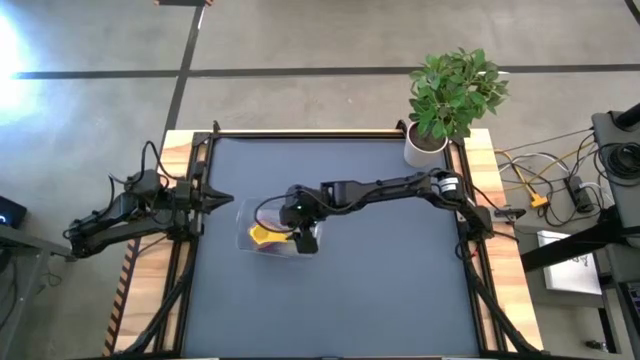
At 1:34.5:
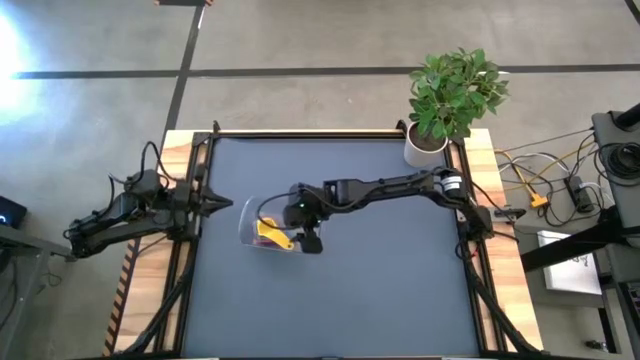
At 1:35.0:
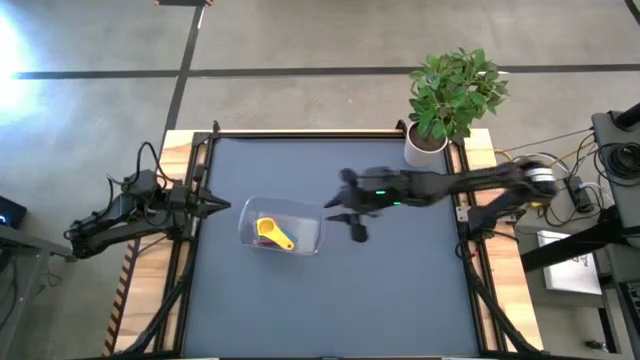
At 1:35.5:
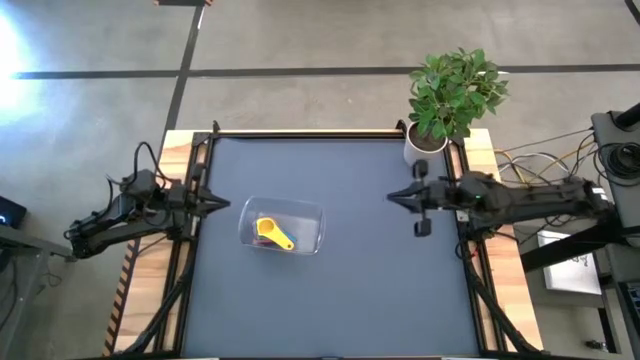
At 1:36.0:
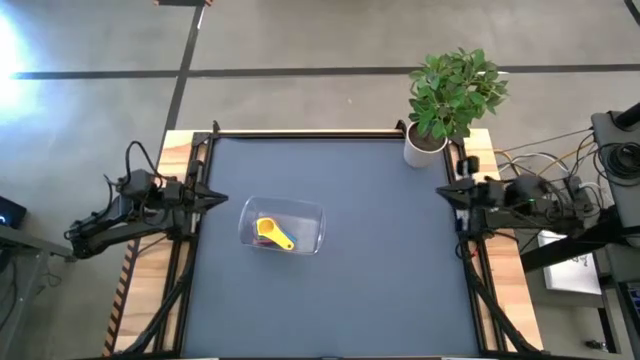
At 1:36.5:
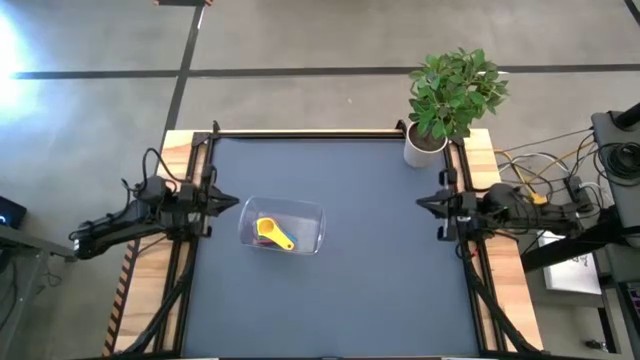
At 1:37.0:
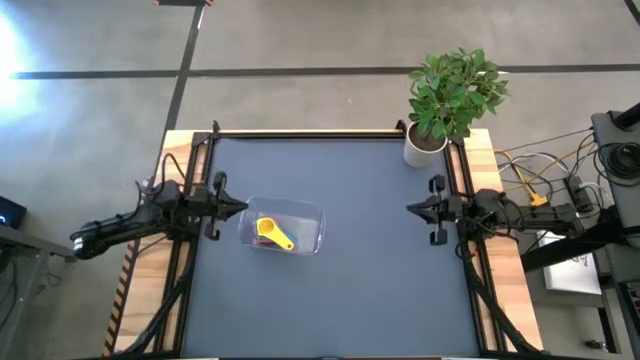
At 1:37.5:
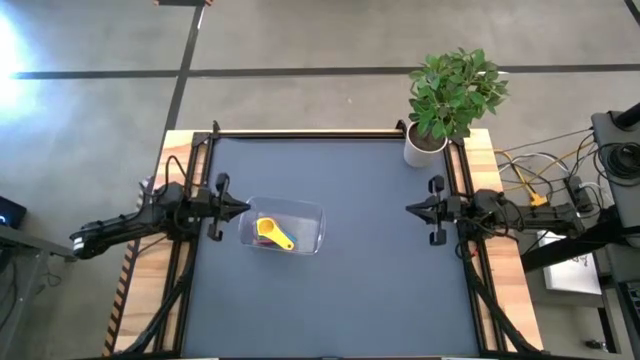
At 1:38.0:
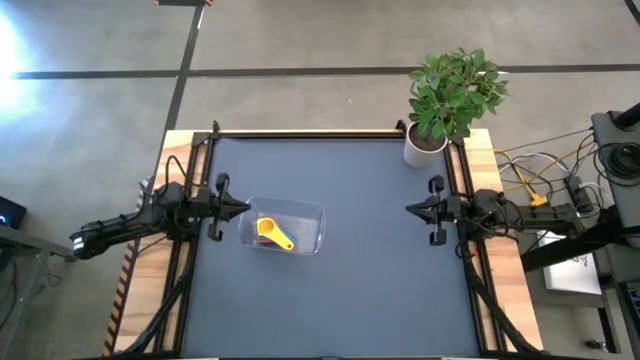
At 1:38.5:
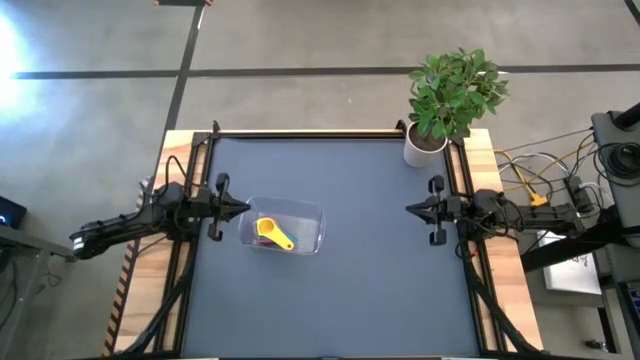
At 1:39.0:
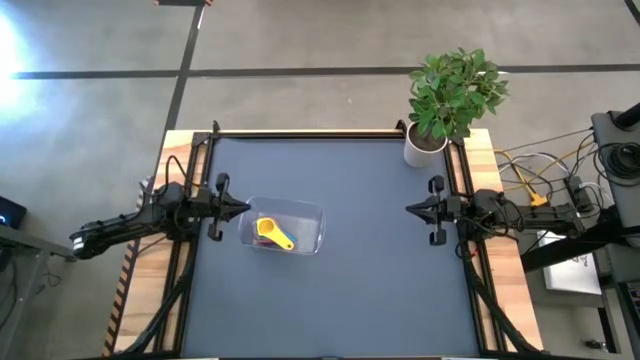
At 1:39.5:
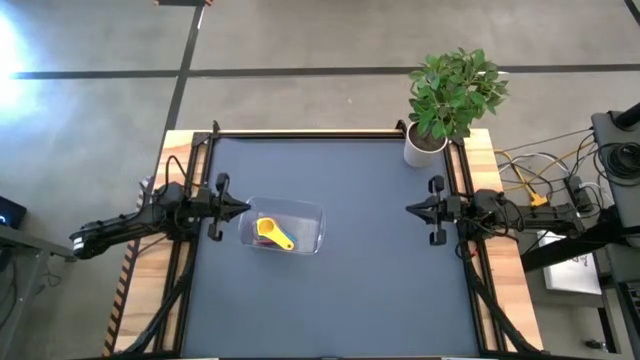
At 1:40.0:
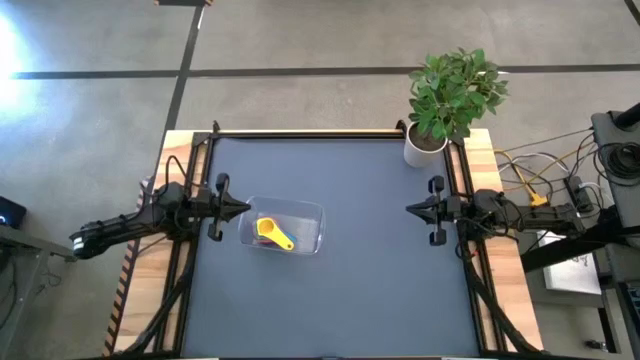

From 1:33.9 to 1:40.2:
Task: Nest measuring cups in basket
Return to Home Position

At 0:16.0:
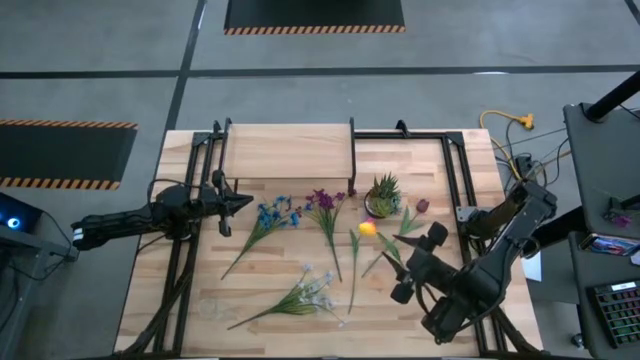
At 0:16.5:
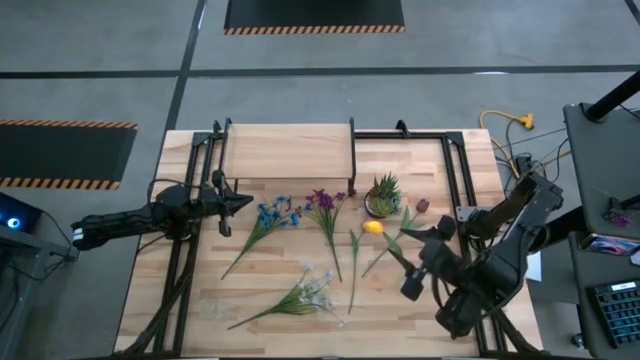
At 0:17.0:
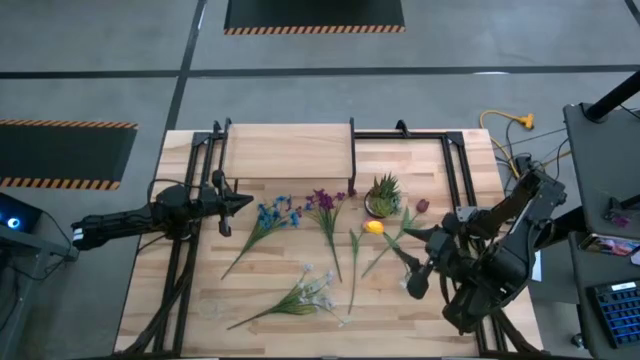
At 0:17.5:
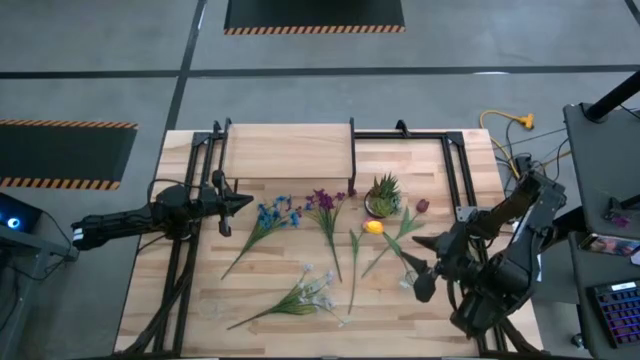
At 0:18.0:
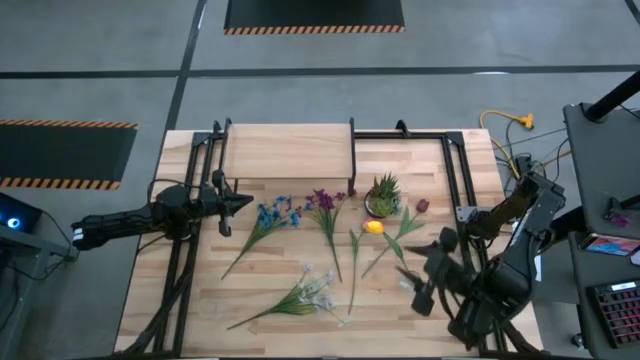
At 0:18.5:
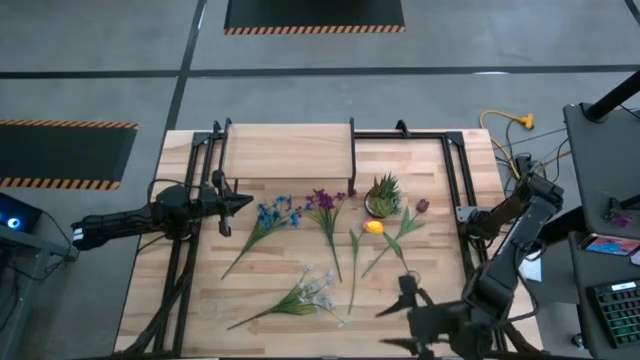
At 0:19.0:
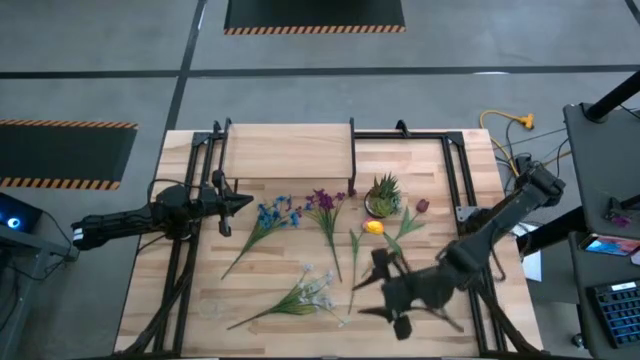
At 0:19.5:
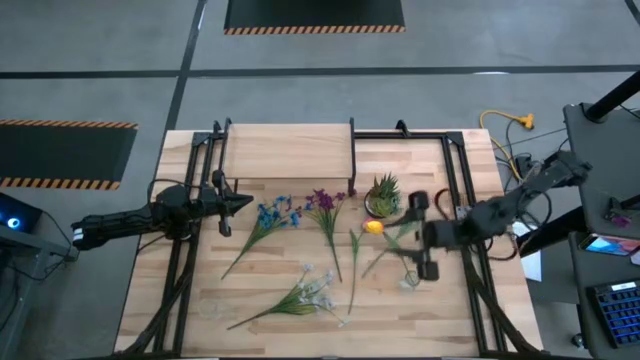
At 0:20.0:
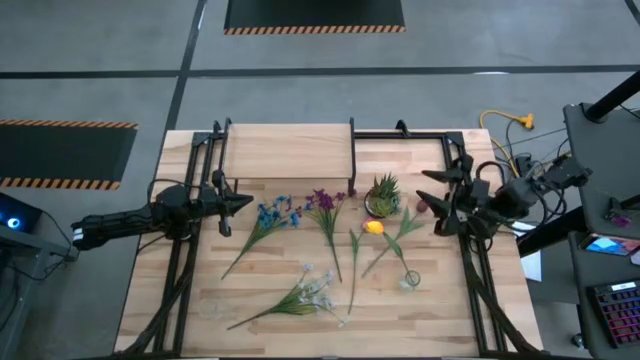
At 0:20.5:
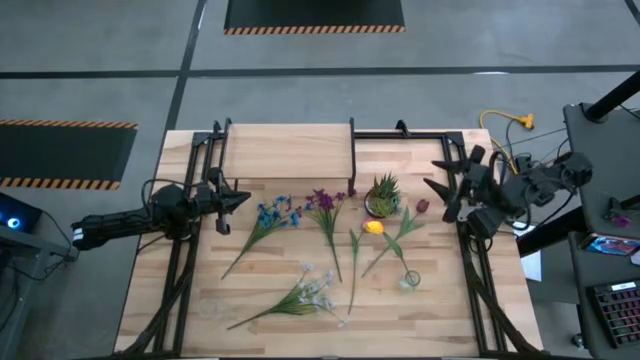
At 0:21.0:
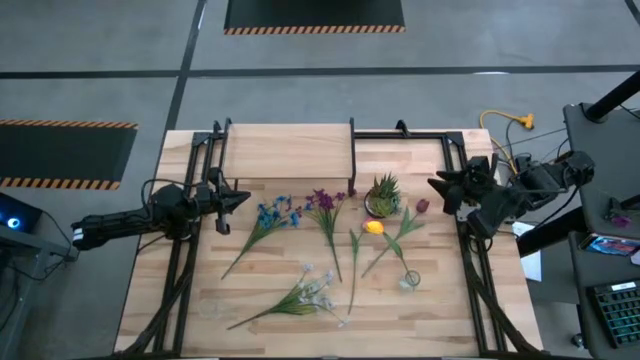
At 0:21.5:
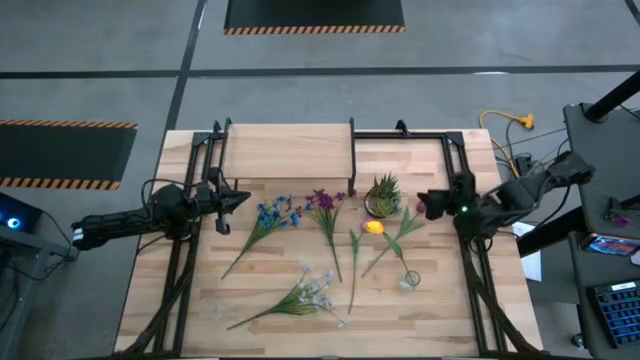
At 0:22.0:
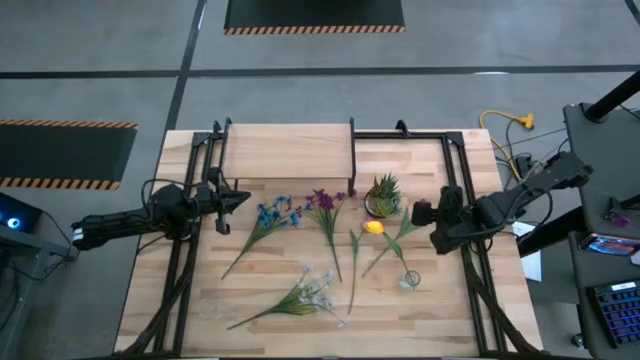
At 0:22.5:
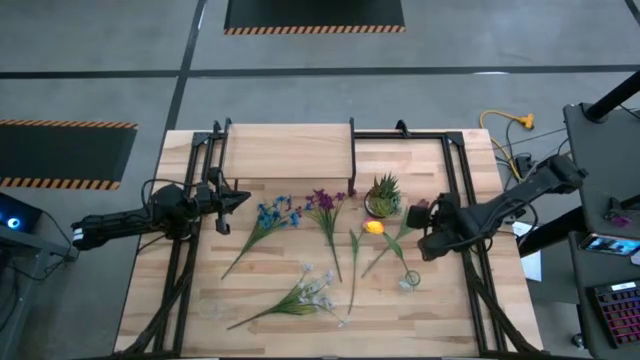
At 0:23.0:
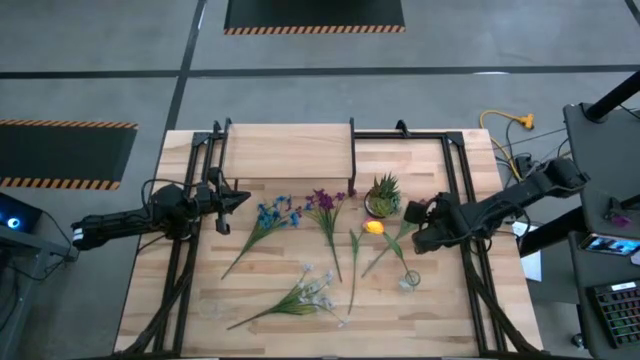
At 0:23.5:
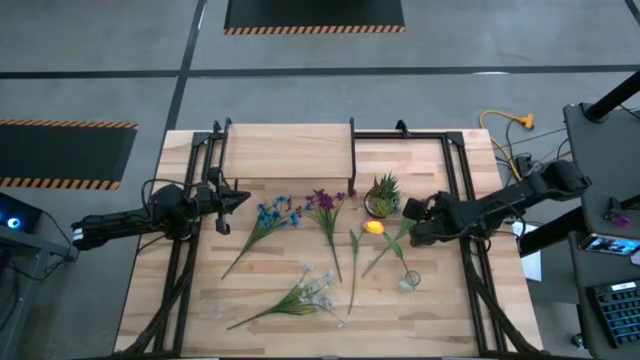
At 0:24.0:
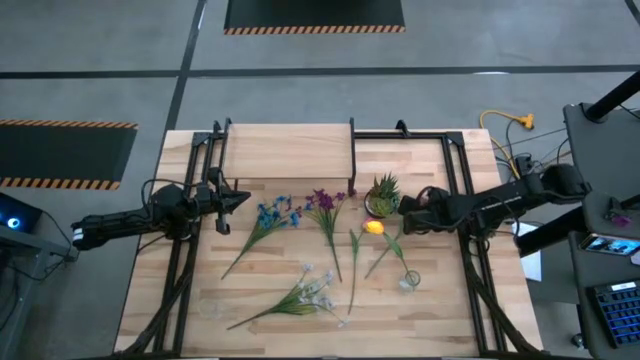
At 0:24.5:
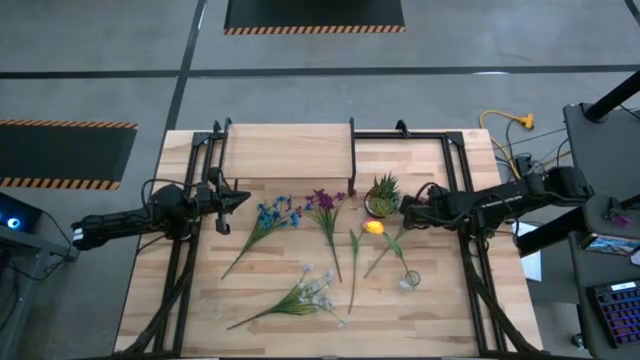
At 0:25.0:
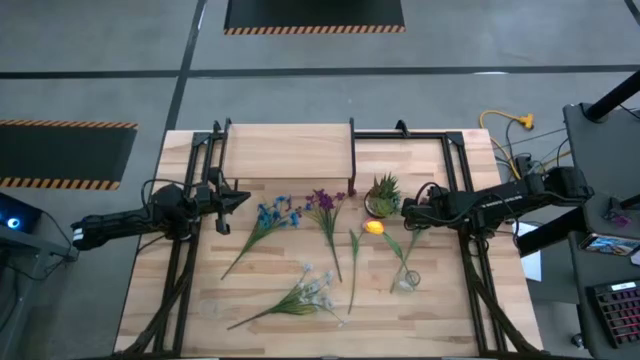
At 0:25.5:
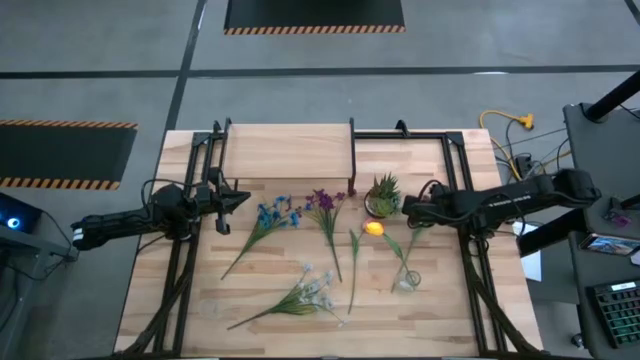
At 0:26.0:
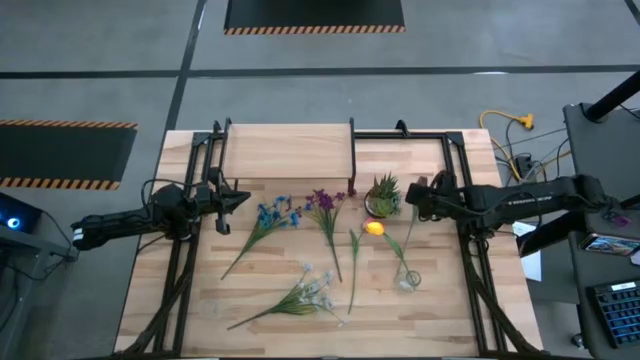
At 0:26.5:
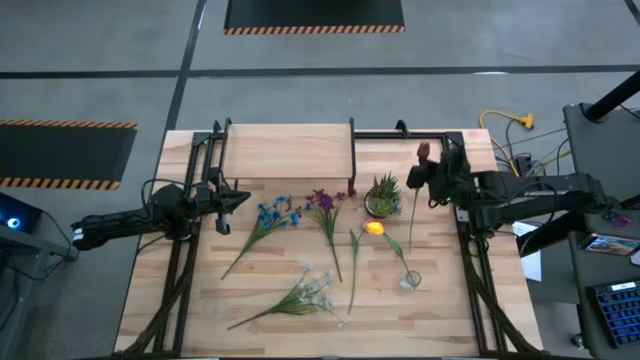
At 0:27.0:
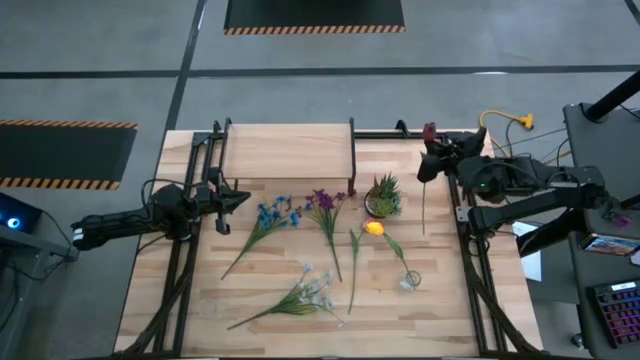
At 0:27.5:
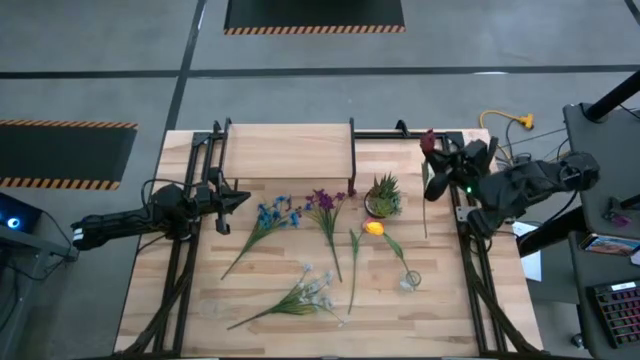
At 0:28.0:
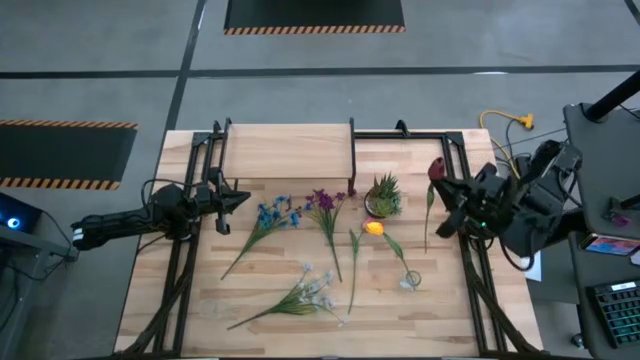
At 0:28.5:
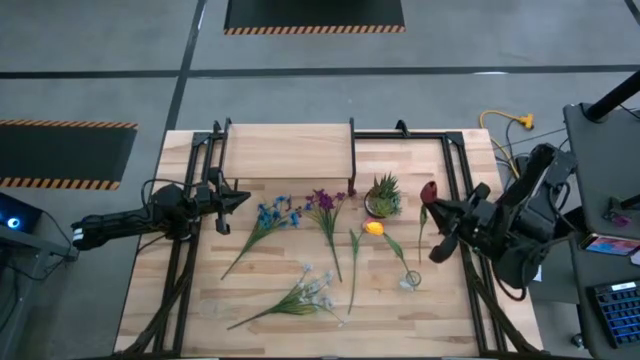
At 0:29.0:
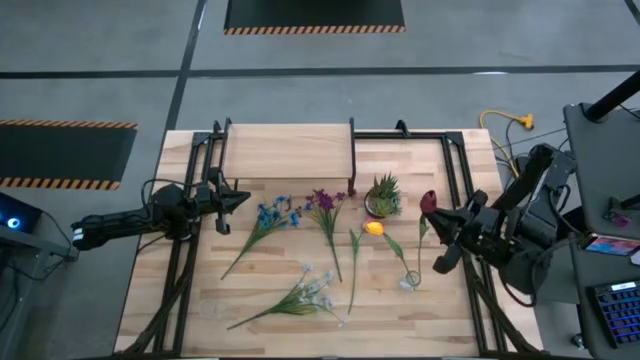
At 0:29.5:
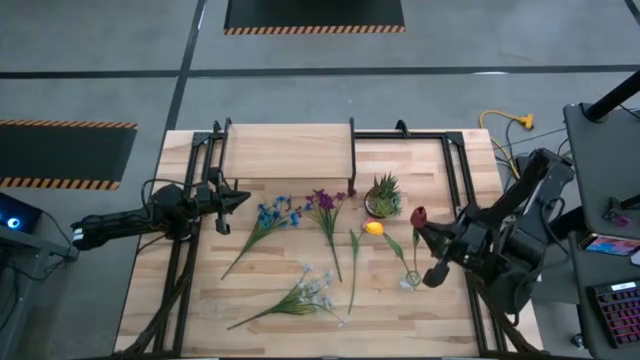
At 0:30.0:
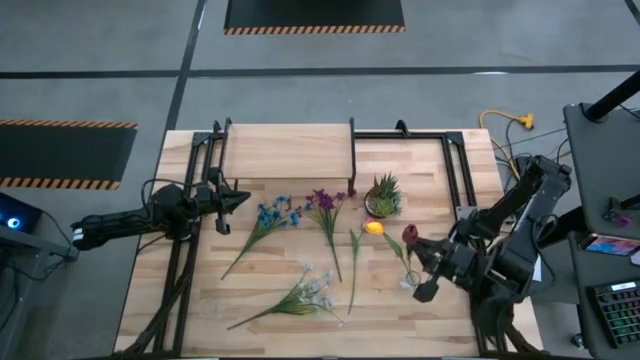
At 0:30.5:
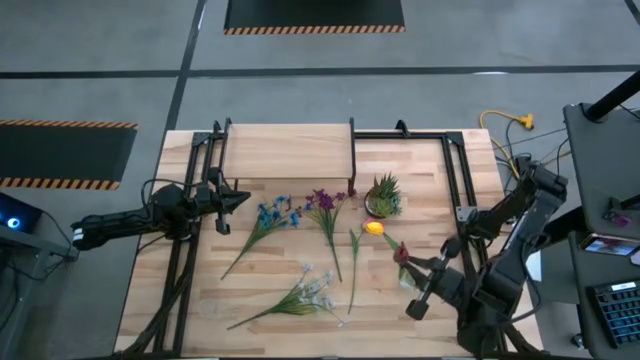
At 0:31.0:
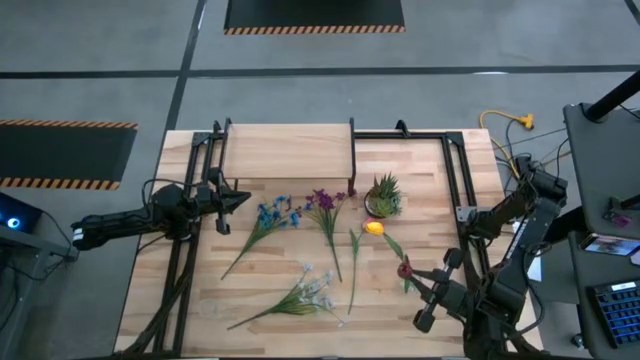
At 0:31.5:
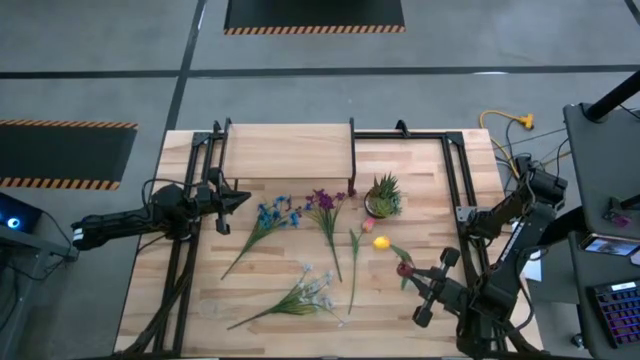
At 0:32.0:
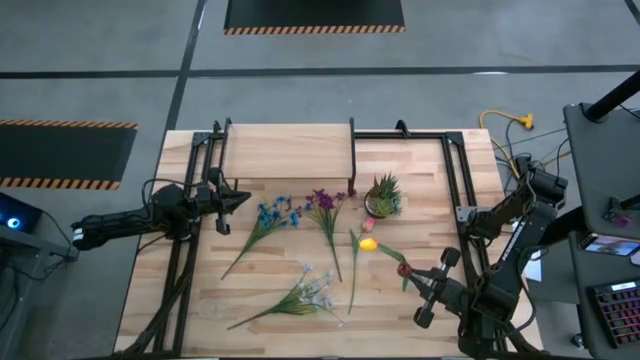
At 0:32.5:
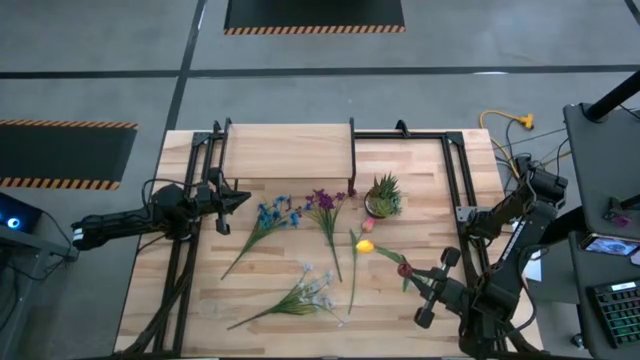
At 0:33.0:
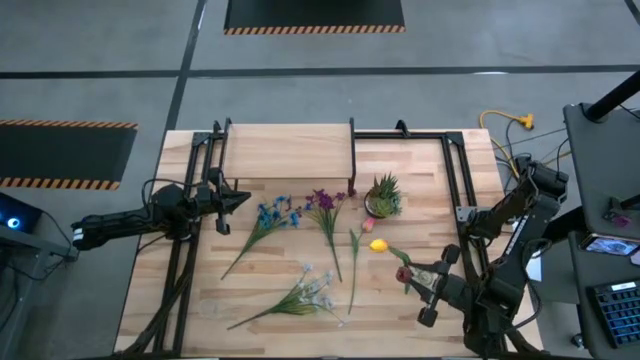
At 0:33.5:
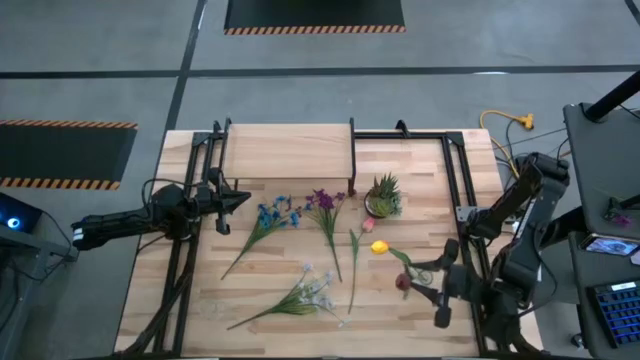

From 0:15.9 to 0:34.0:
Task: Pick and place flowers into a vace then onto a shelf
Put the red tulip into the right transparent vase
